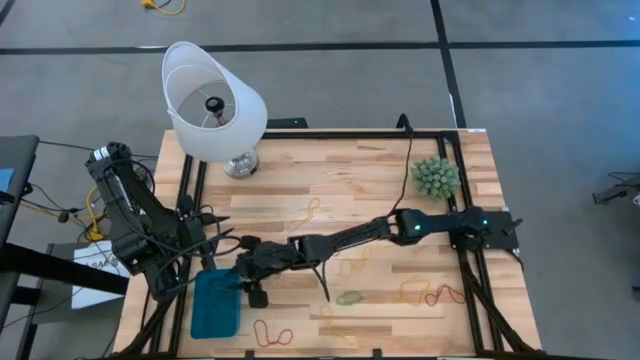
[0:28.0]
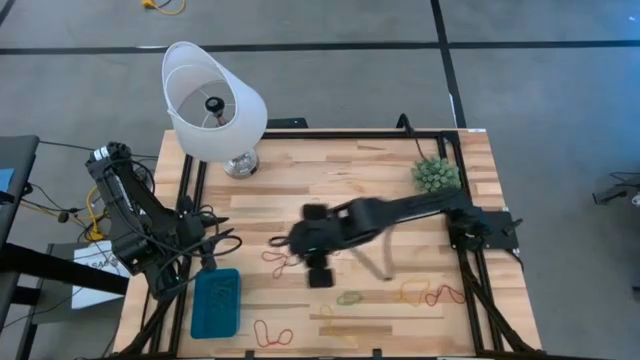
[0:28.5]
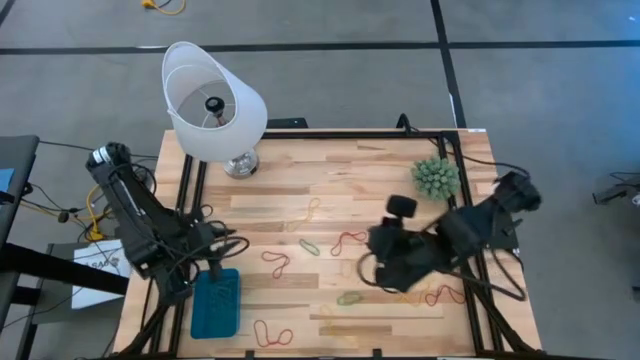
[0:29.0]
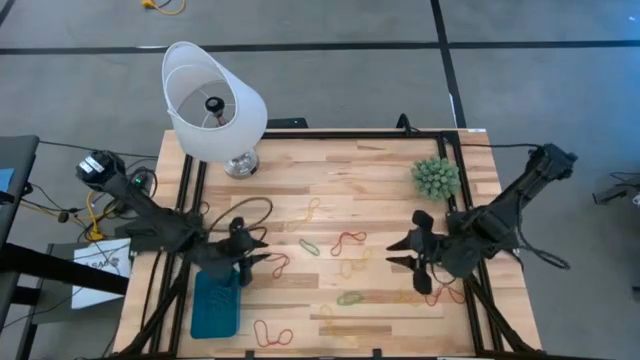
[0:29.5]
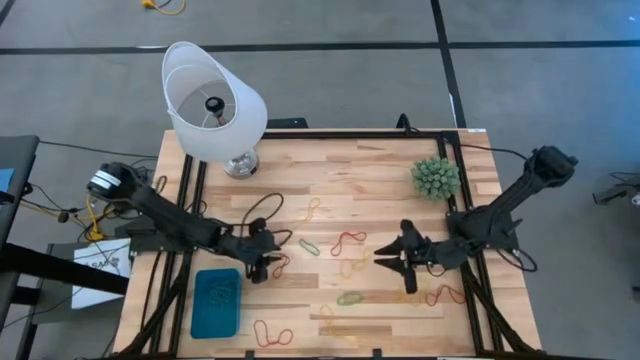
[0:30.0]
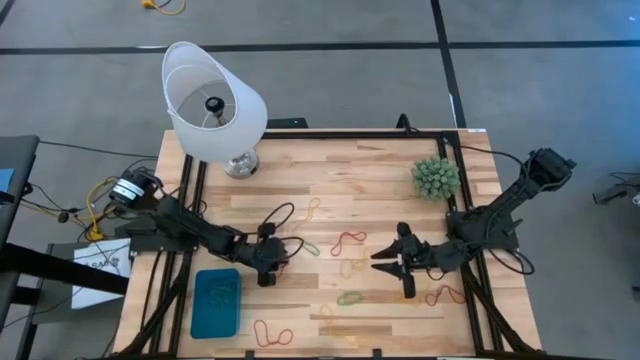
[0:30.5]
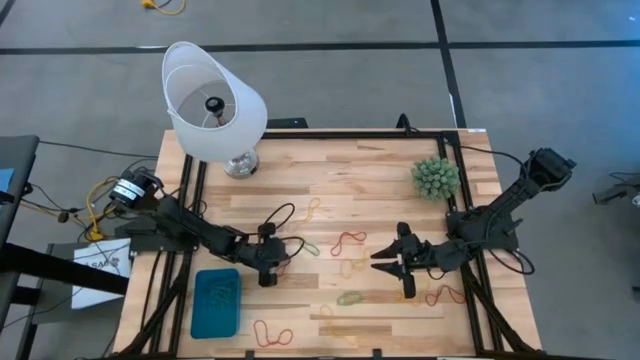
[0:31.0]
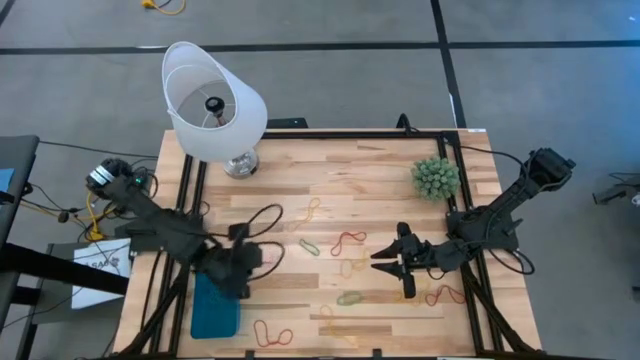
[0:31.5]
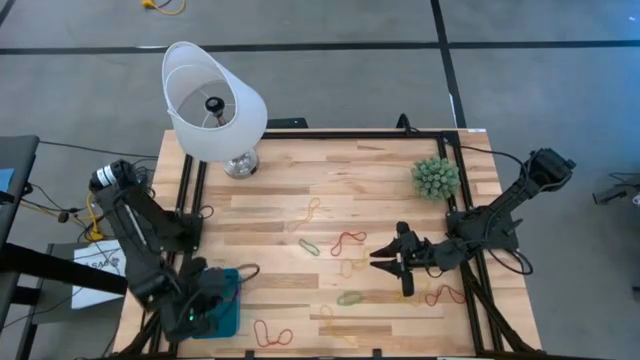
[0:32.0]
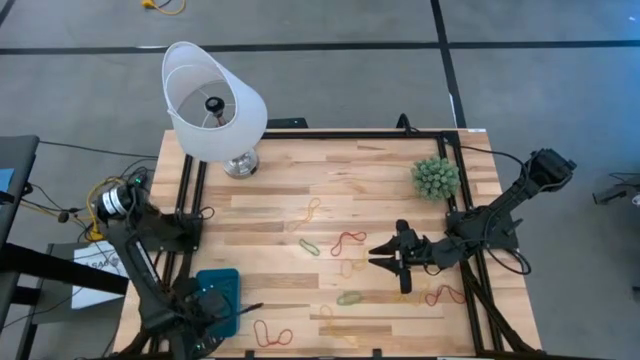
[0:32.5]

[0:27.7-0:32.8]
Task: Pick and place items into bin
Put the red rubber band into the blue bin

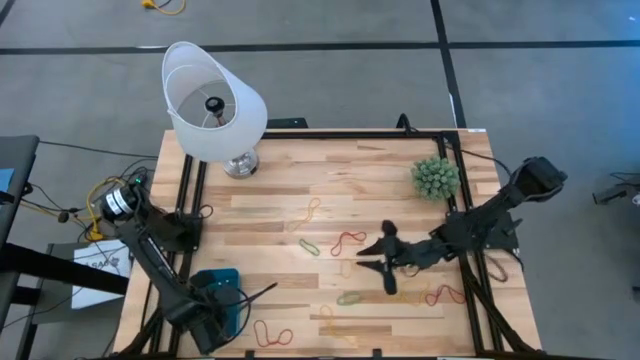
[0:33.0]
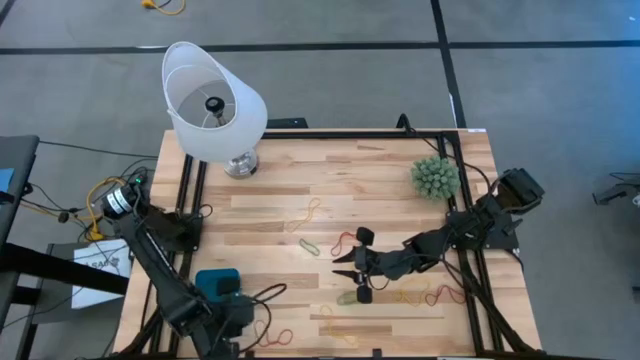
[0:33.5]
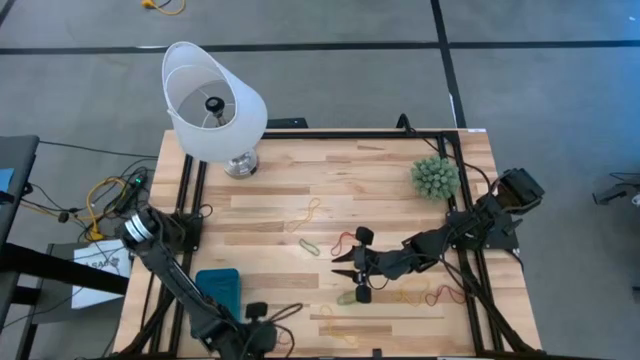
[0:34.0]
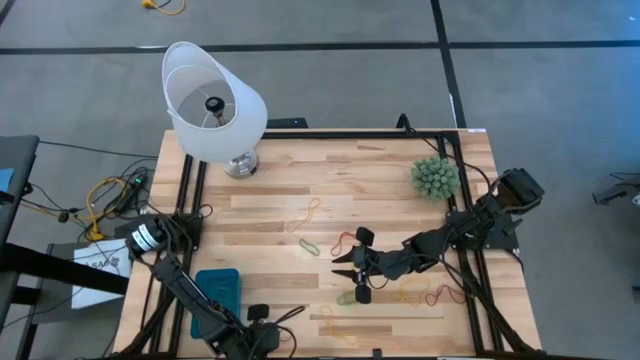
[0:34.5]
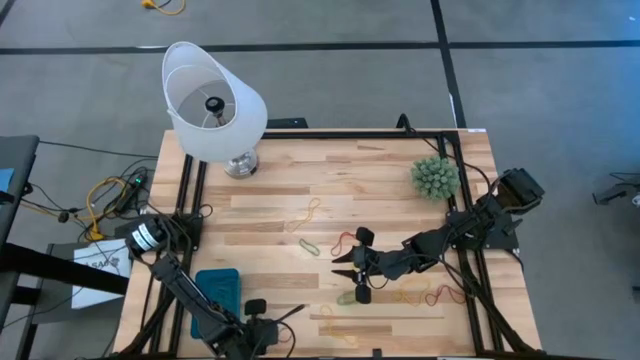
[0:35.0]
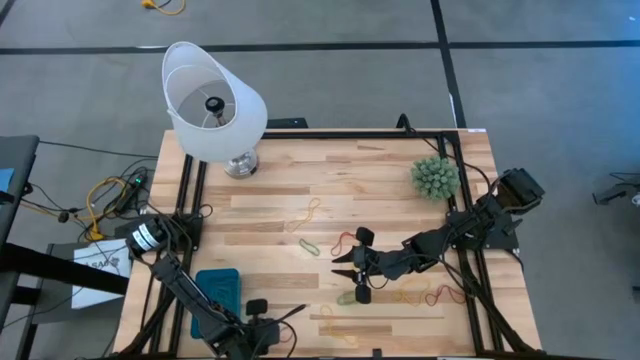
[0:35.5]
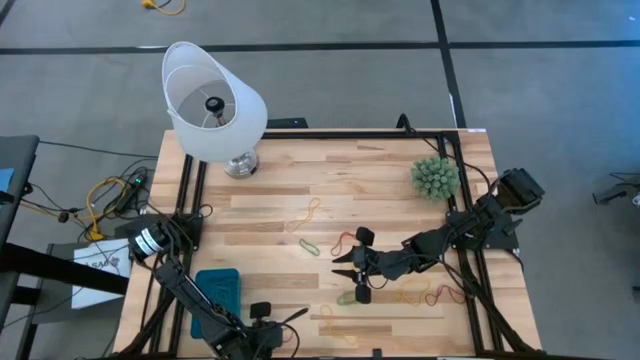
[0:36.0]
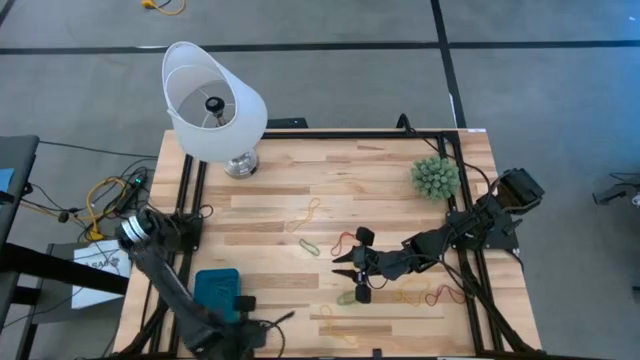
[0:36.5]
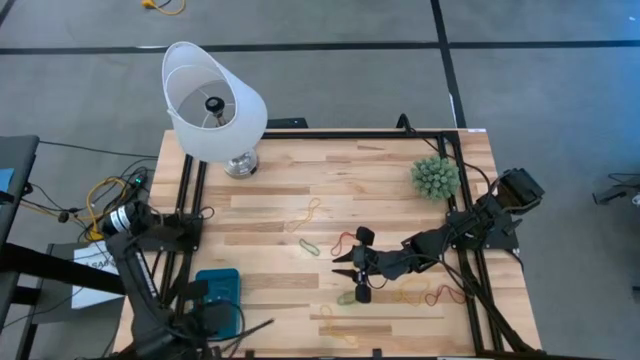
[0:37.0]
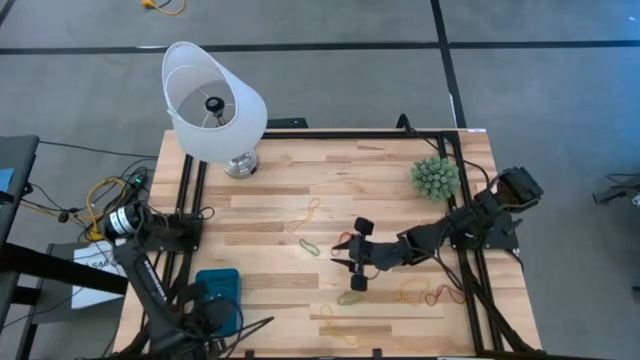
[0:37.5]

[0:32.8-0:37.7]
Put the red rubber band into the blue bin

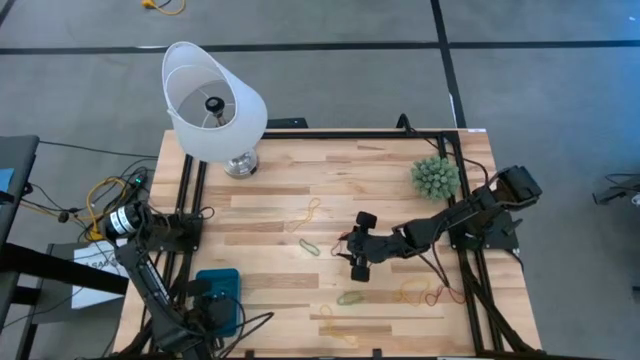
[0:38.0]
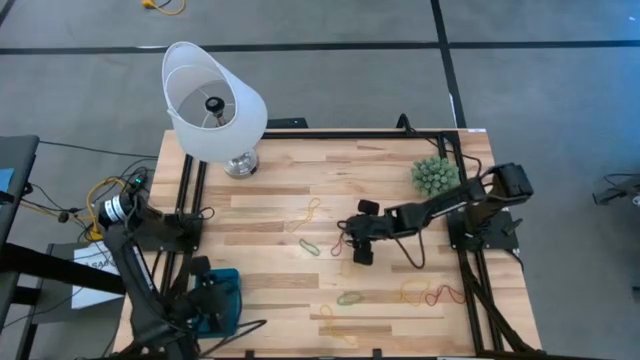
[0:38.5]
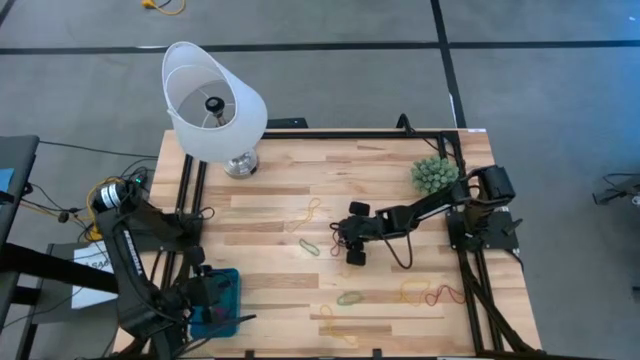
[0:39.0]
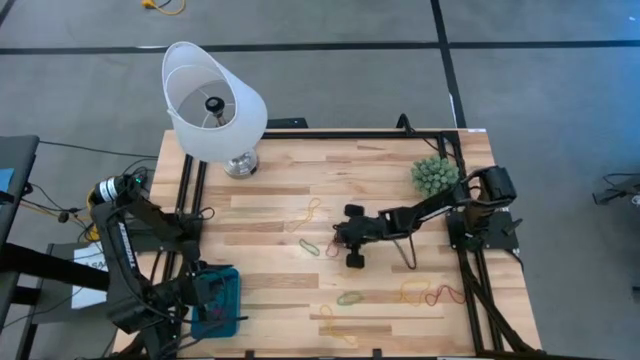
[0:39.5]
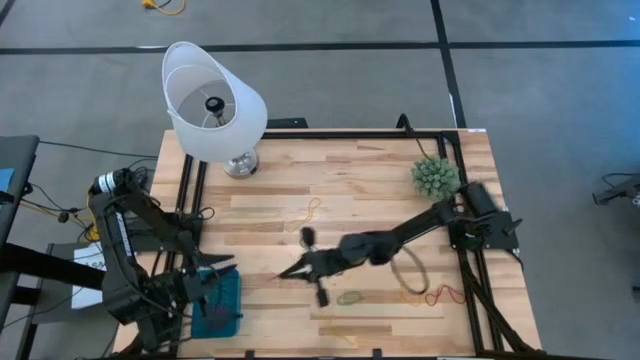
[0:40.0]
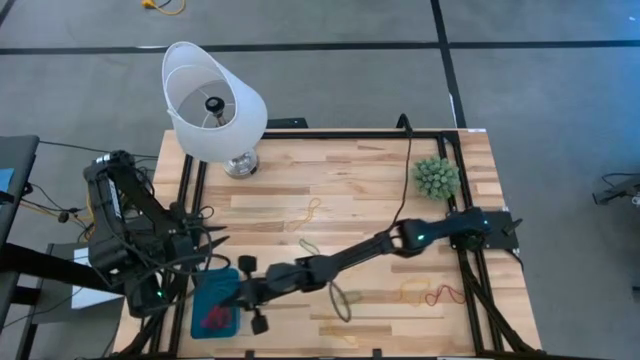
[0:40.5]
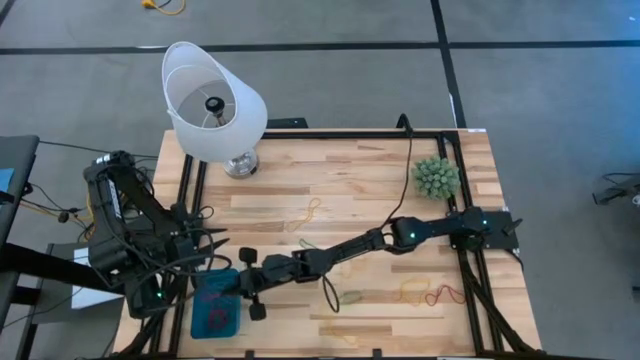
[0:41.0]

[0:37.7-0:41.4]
Put the red rubber band into the blue bin

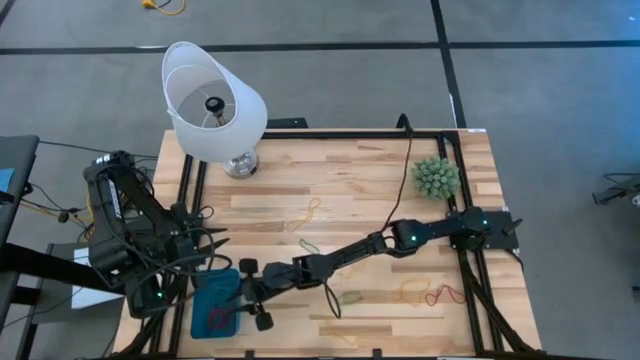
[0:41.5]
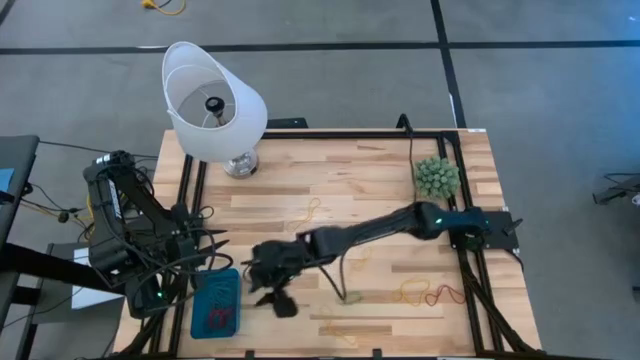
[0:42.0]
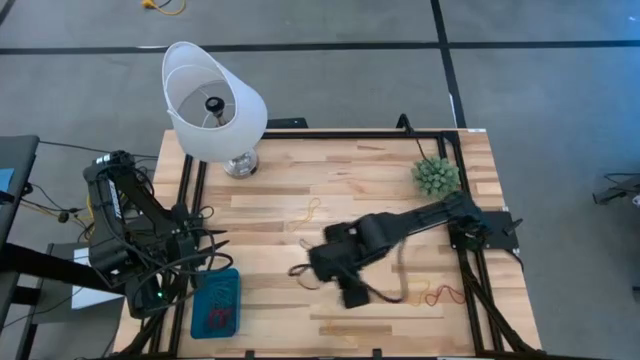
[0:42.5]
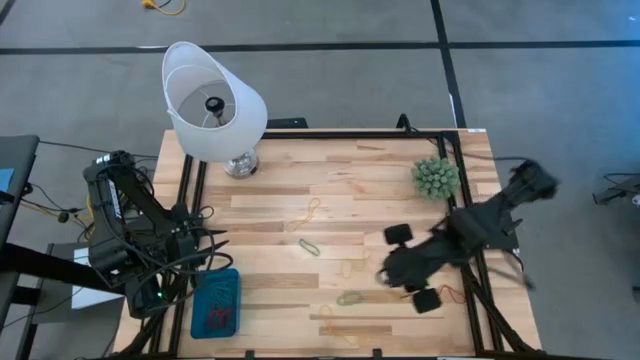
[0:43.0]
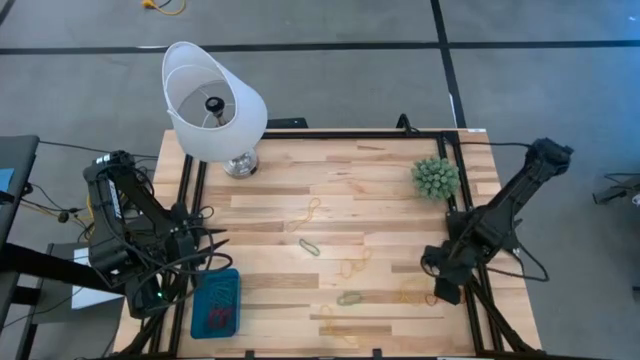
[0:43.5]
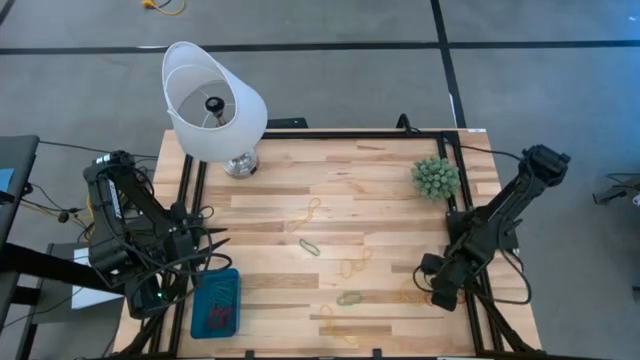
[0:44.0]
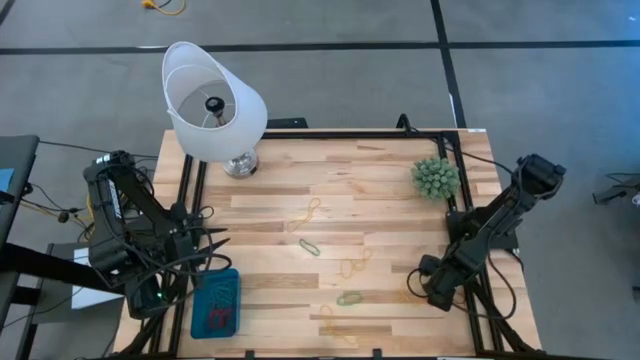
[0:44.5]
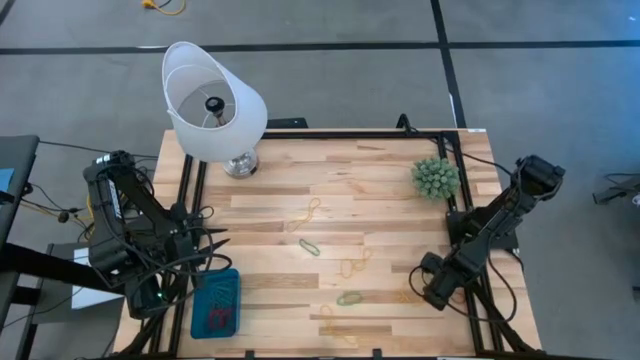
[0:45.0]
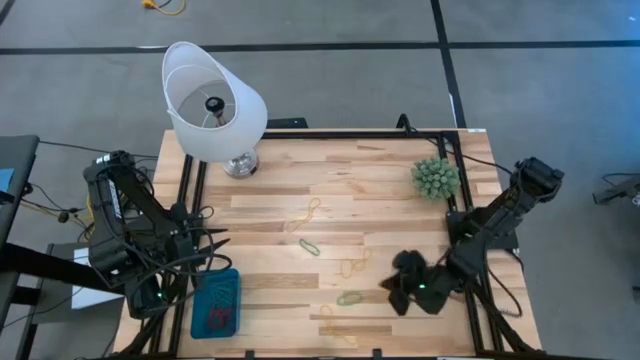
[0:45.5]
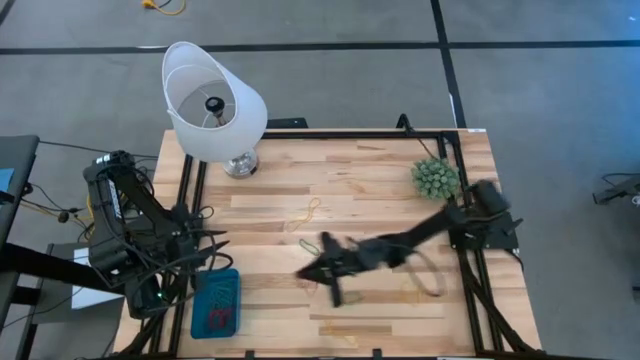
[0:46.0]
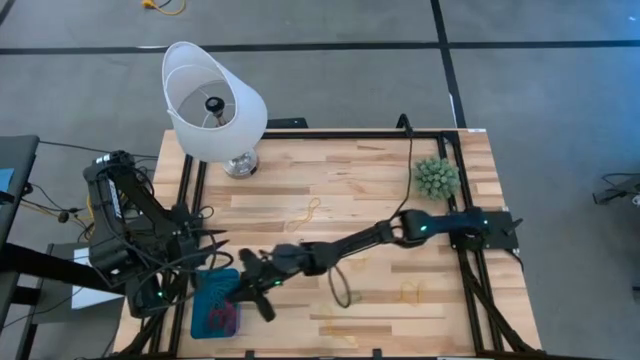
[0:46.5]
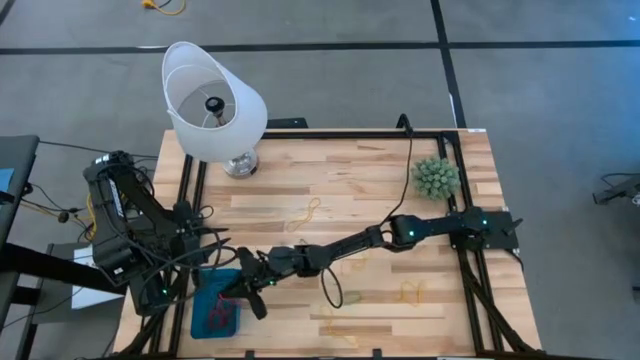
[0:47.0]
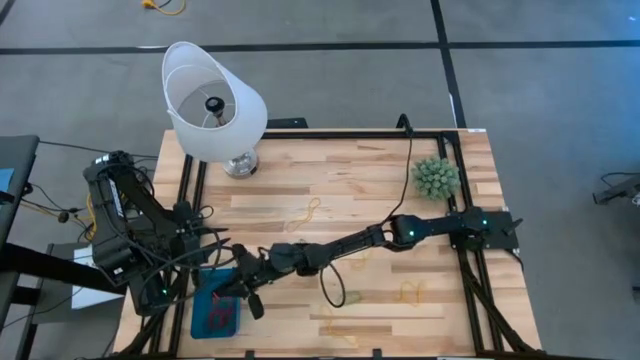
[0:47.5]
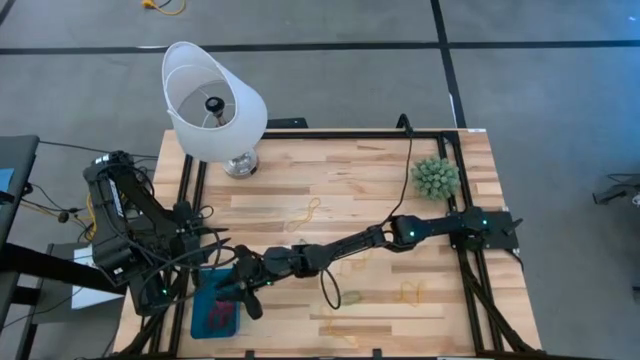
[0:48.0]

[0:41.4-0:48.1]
Put the red rubber band into the blue bin
